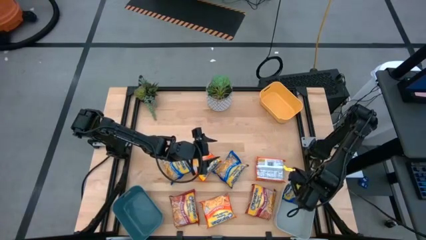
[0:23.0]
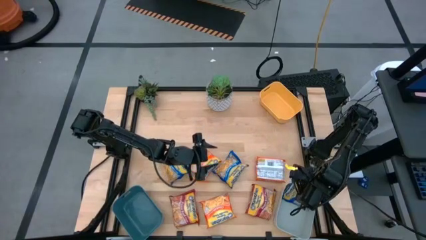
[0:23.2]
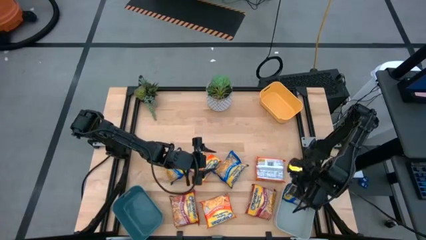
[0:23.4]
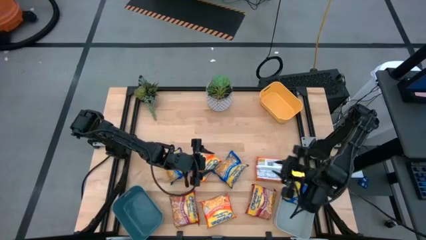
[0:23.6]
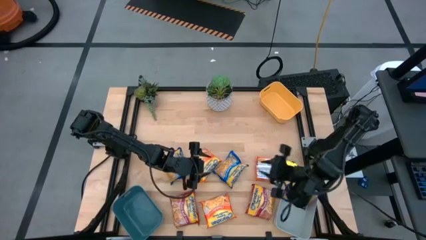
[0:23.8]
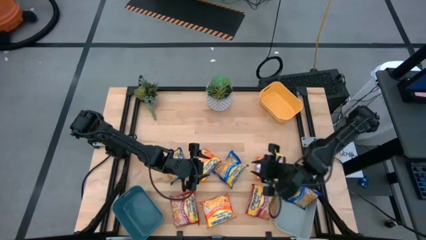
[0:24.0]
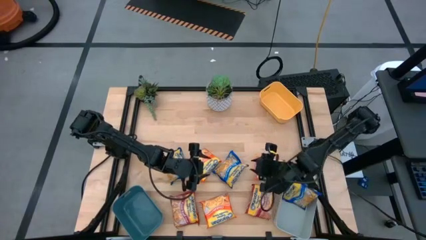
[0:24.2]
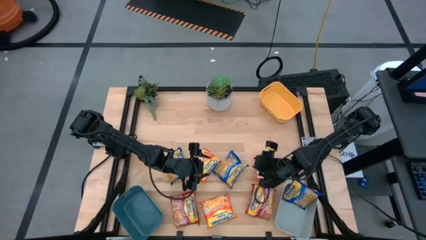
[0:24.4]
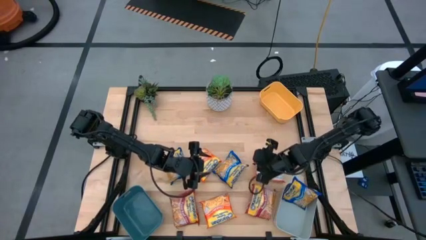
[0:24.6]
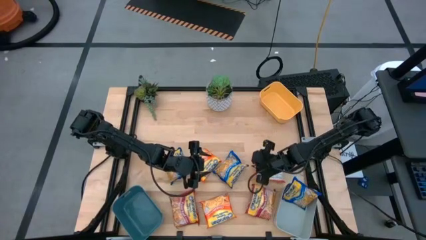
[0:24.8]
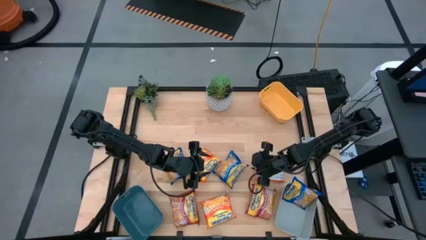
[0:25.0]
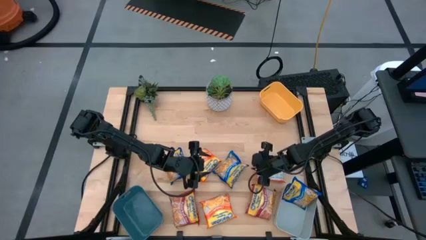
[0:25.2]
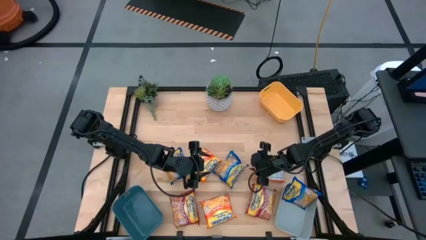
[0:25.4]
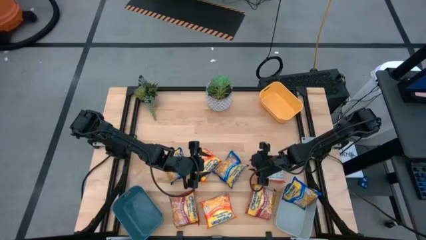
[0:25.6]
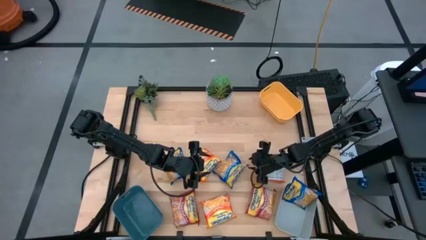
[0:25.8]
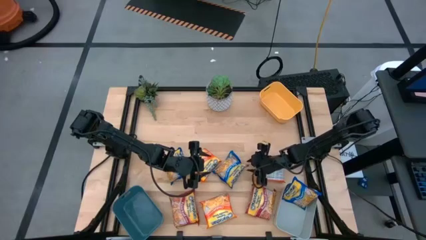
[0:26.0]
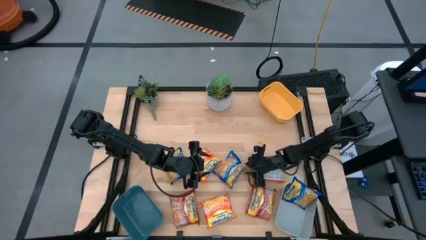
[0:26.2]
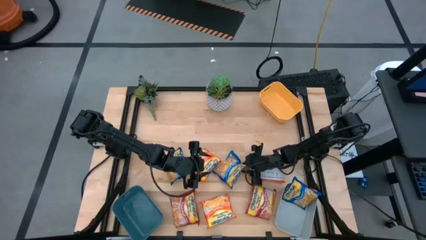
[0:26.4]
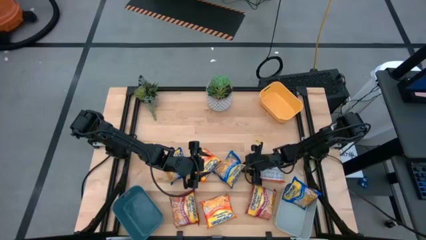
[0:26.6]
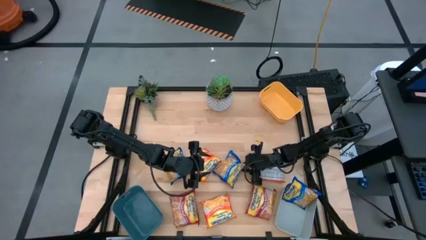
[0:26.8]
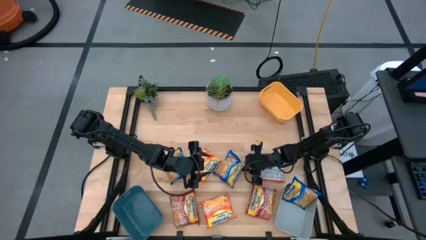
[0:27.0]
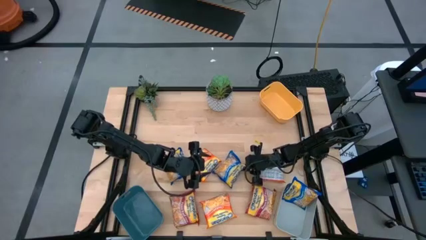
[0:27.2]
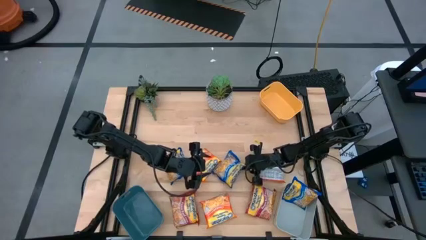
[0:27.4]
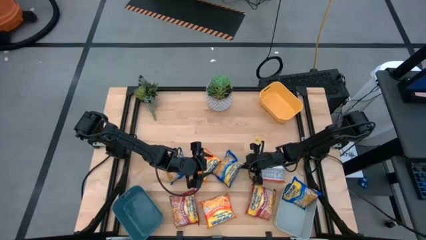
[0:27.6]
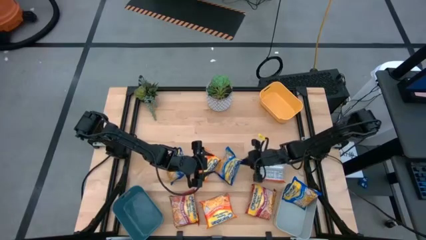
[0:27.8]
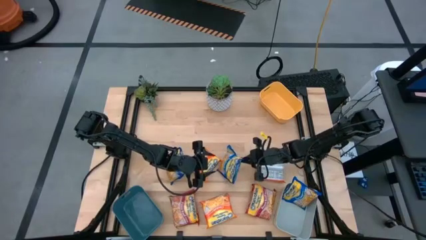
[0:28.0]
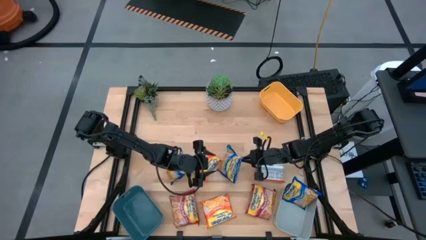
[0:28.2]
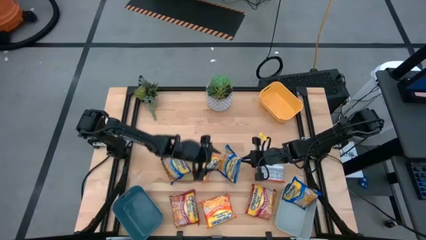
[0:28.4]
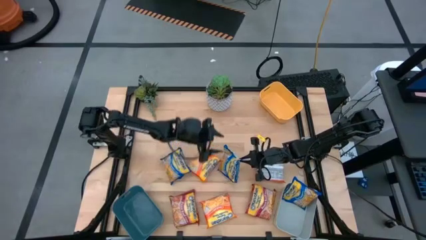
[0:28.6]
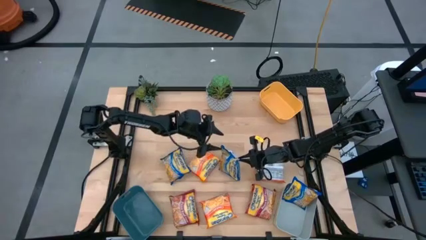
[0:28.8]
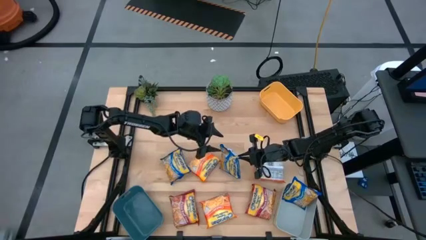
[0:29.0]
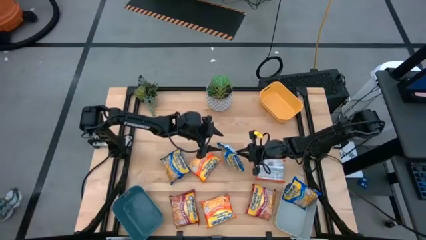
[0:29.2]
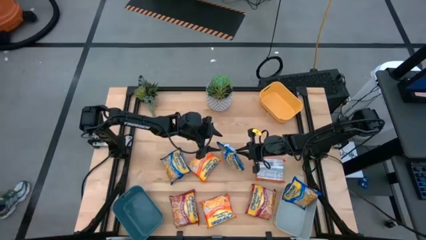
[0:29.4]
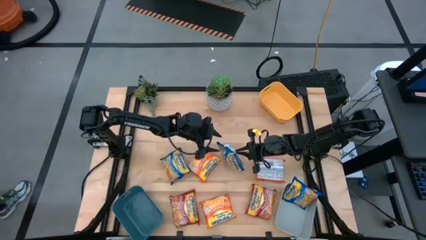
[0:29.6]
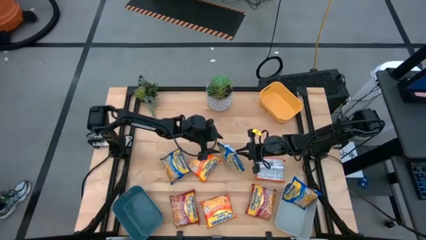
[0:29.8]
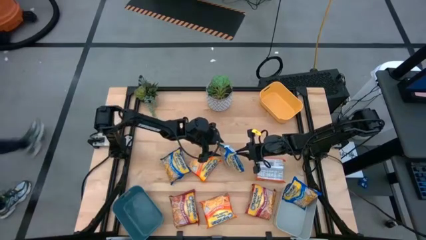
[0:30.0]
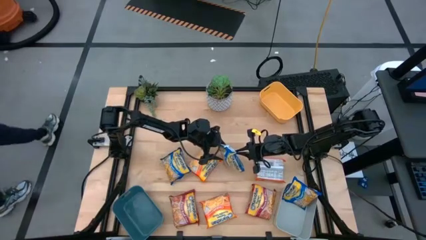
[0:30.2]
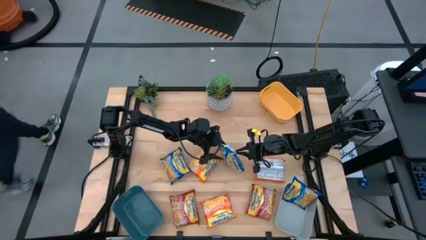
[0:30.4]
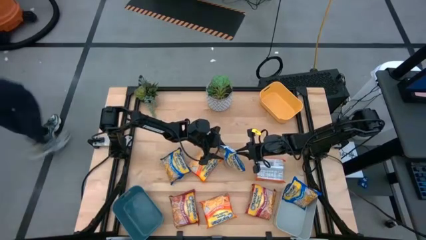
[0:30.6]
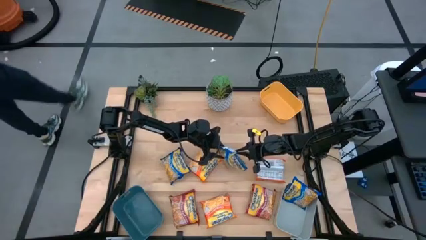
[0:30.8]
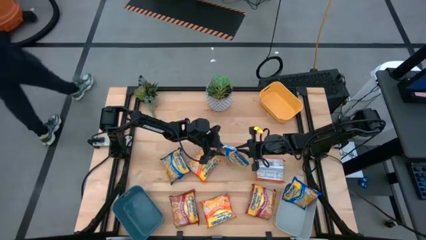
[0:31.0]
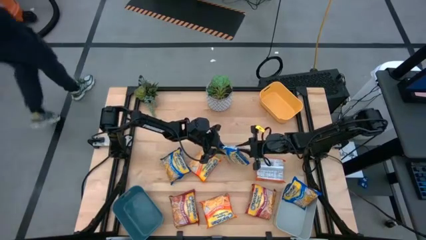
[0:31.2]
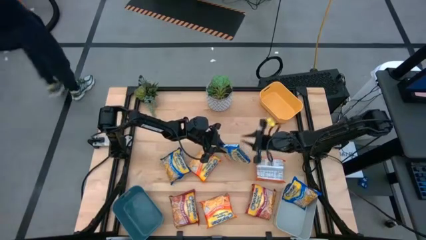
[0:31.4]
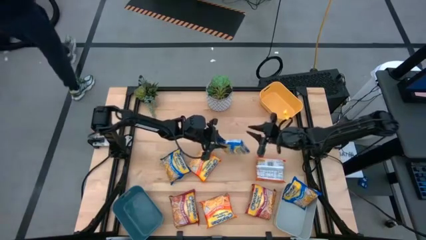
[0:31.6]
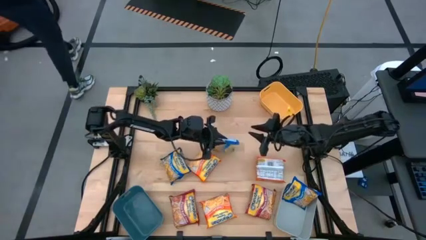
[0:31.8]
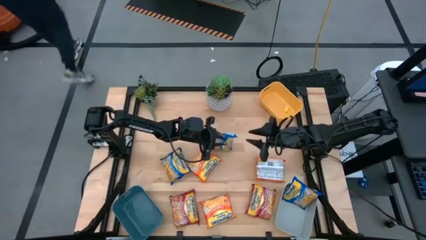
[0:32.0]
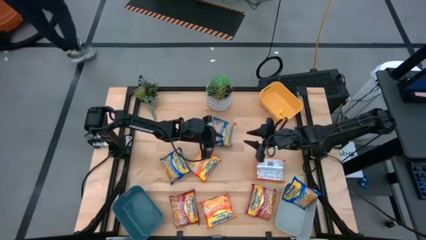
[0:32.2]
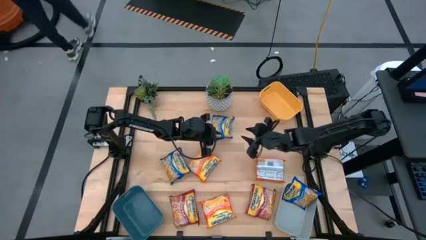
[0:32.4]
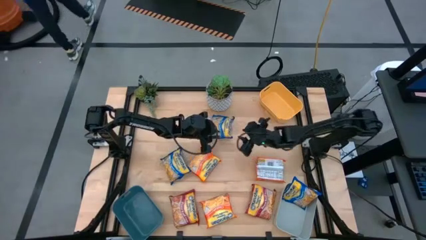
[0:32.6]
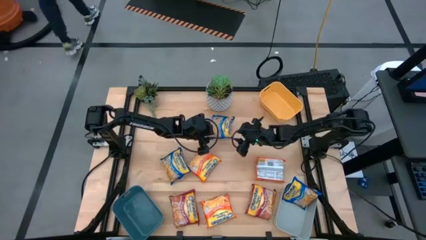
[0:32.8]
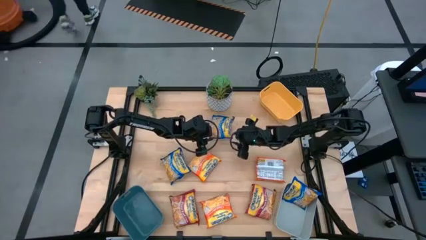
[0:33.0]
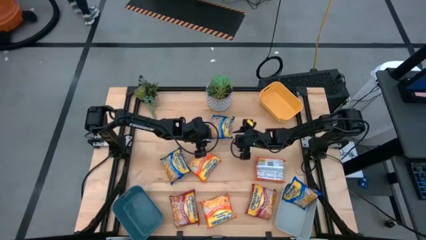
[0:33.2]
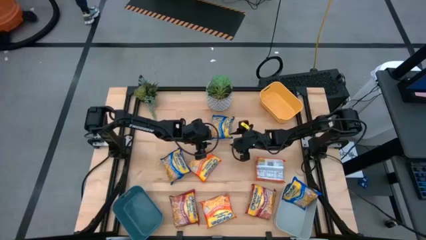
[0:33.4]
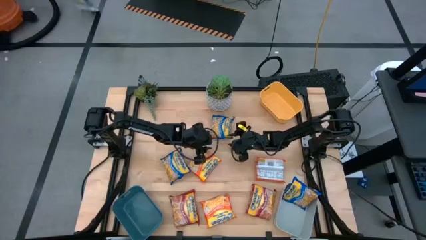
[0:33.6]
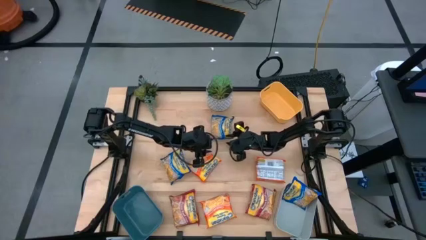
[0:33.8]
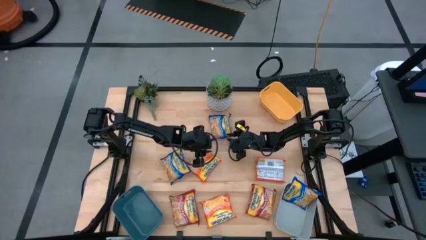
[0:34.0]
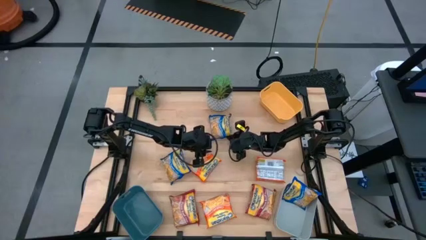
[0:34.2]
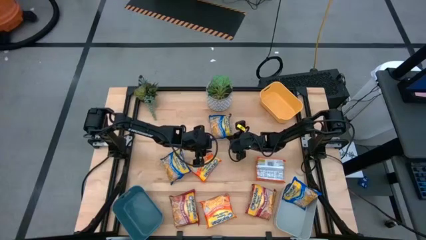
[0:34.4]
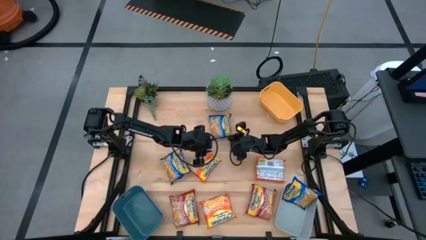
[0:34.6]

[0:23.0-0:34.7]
Task: Sort Maruchan noodles
Put the right blue noodle pack into the gray bin
